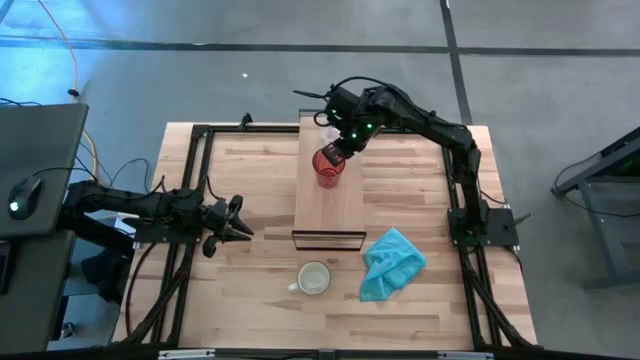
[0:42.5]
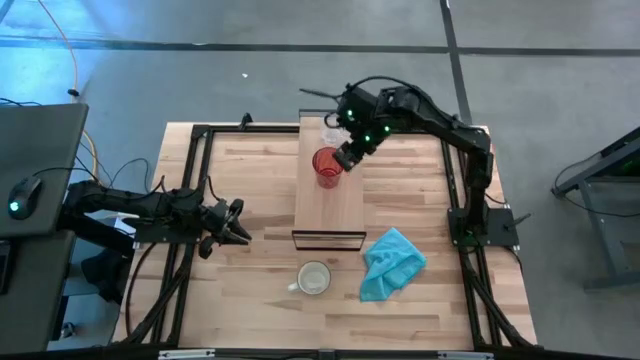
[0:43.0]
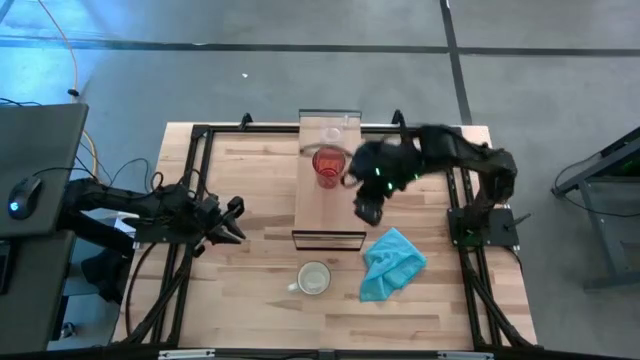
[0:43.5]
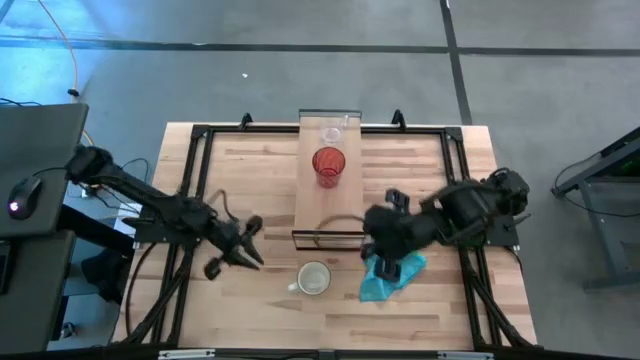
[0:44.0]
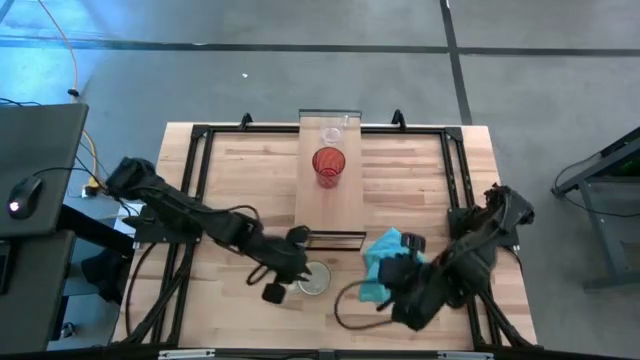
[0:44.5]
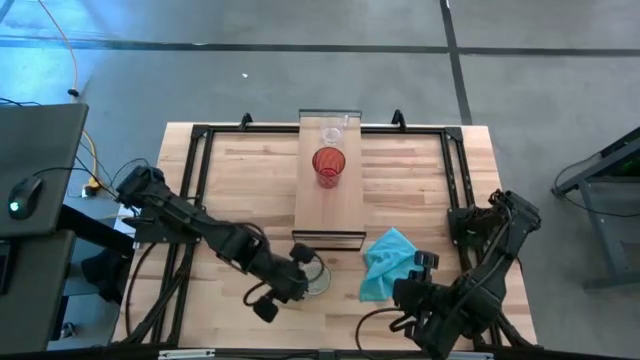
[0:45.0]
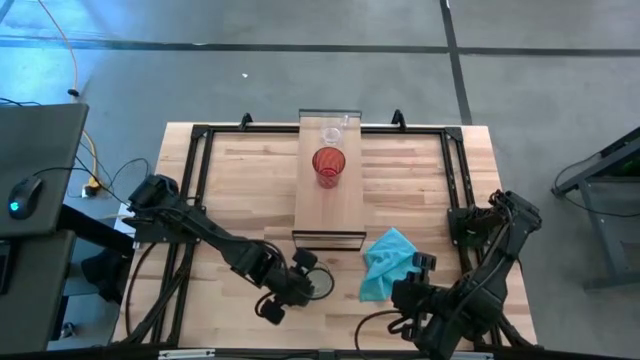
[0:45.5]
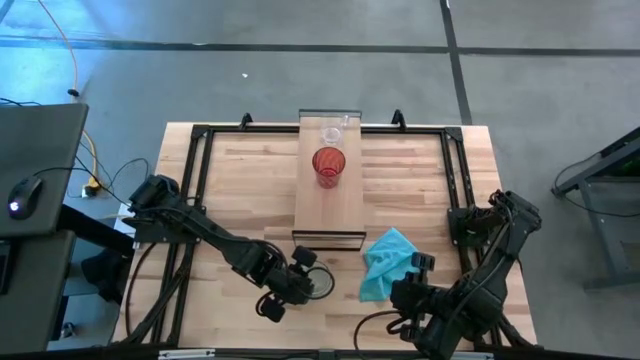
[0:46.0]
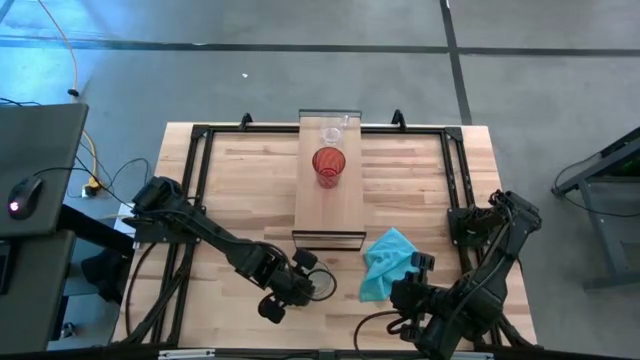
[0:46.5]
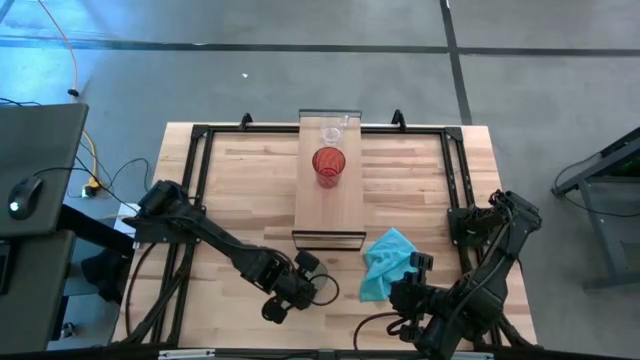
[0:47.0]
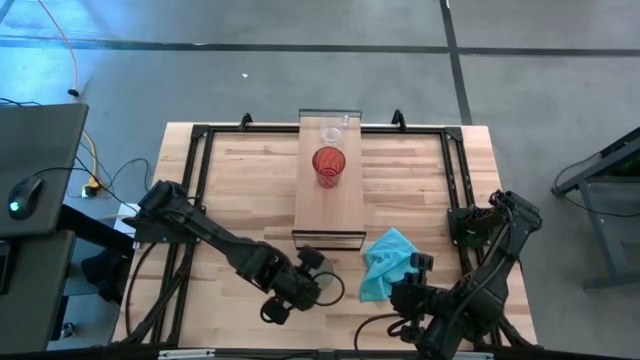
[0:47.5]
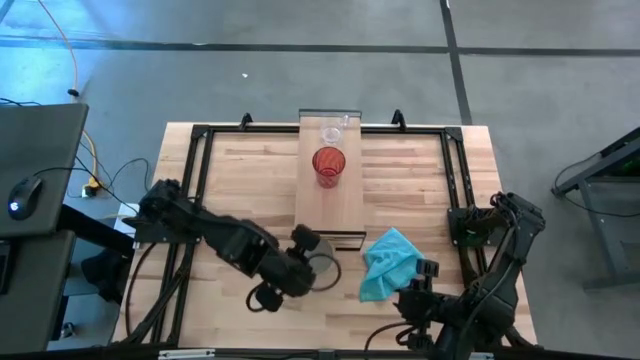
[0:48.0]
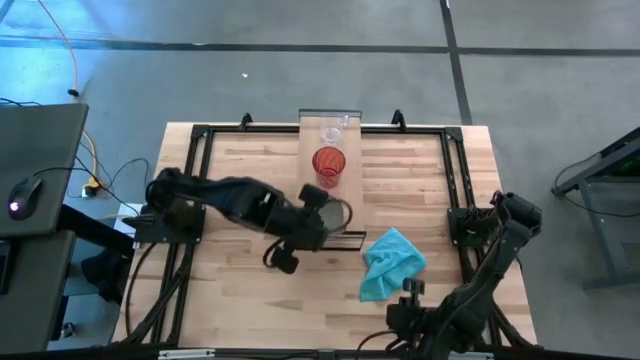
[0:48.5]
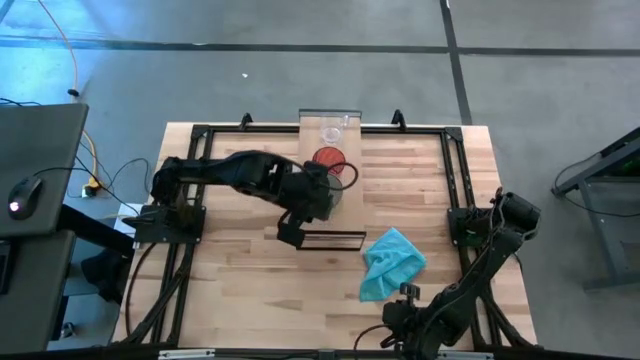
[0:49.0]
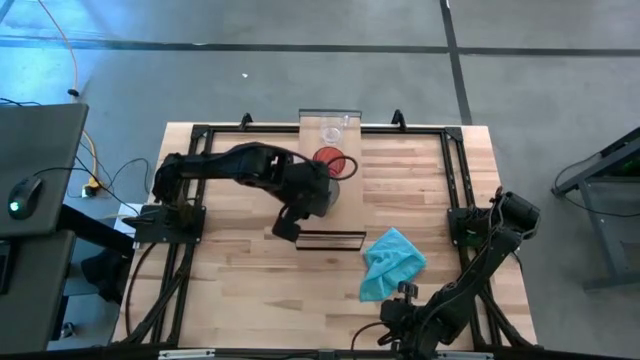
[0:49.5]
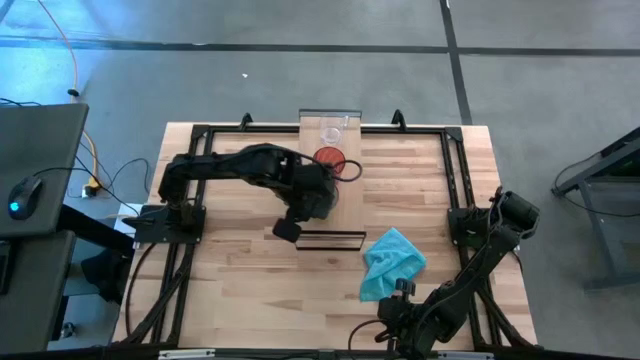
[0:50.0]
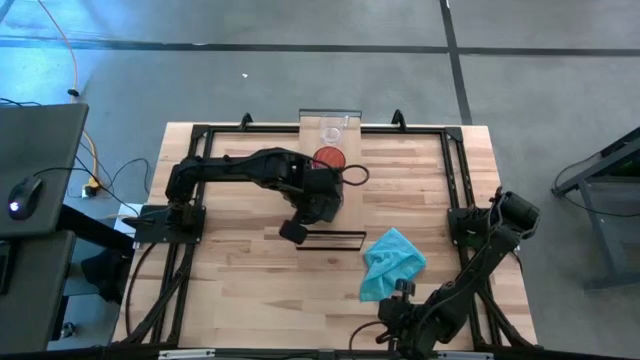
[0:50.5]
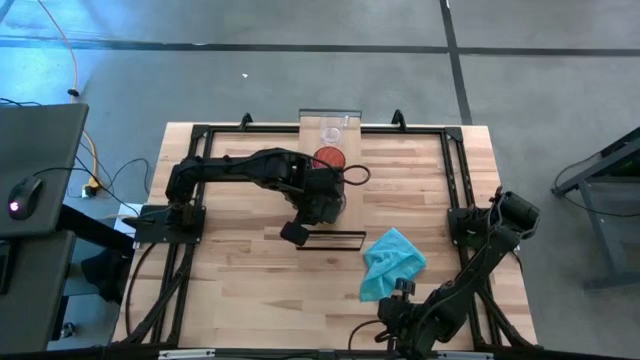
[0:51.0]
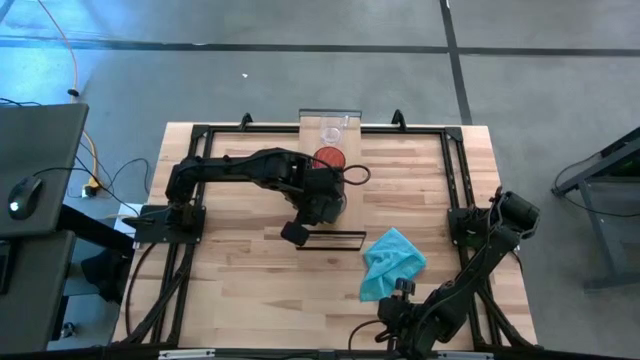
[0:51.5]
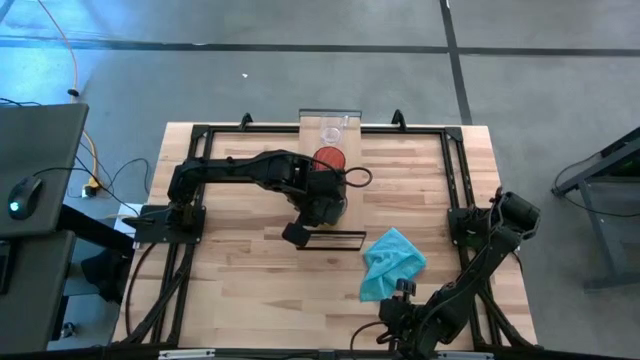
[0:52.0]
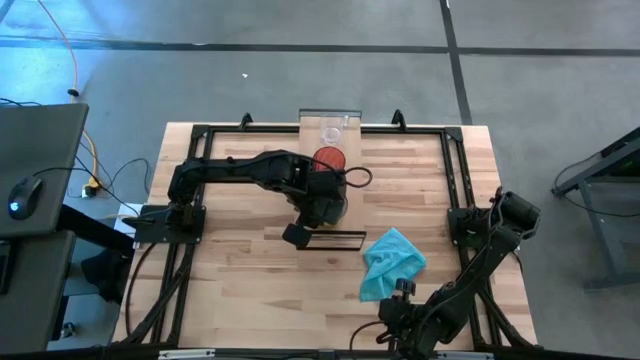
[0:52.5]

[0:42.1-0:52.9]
Task: Stack small to large cups/mugs on shelf
Put the yellow mug on the shelf

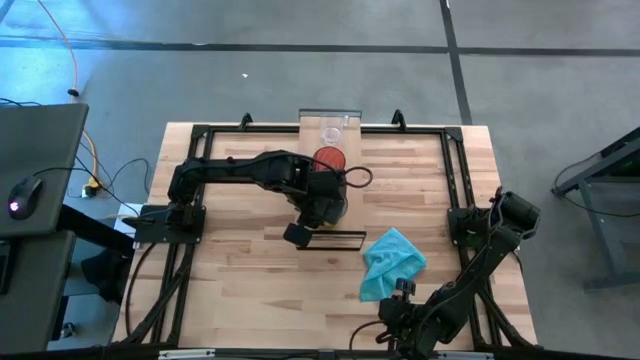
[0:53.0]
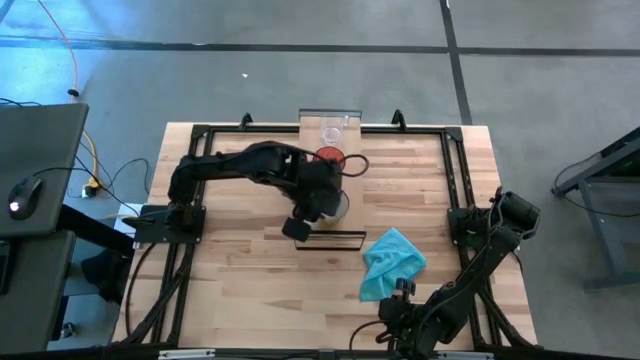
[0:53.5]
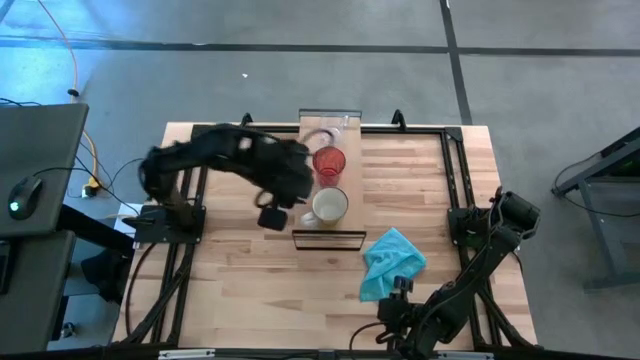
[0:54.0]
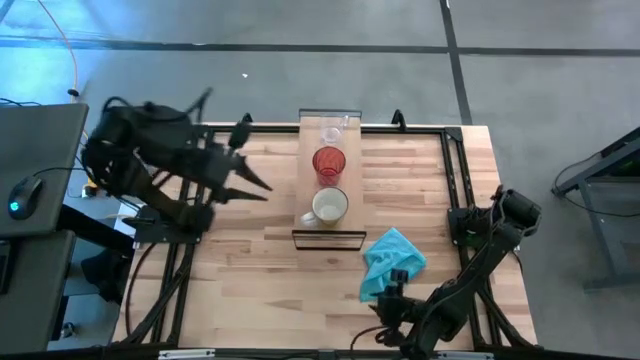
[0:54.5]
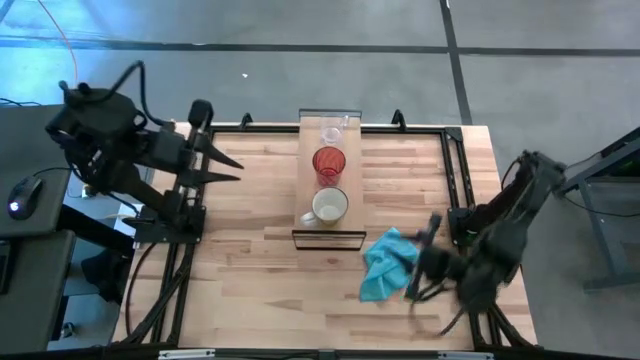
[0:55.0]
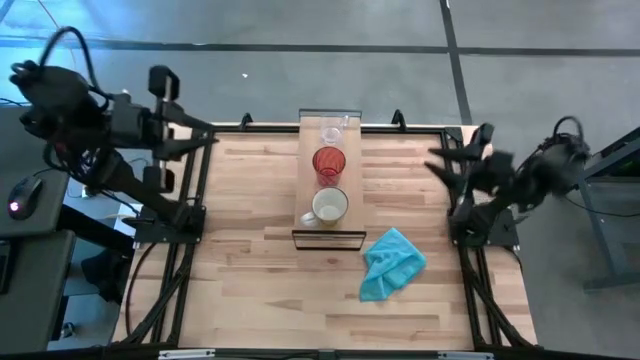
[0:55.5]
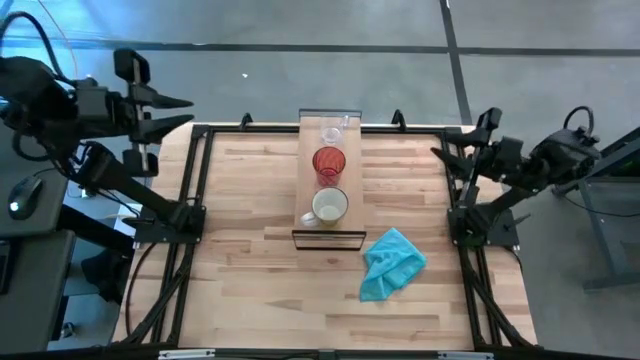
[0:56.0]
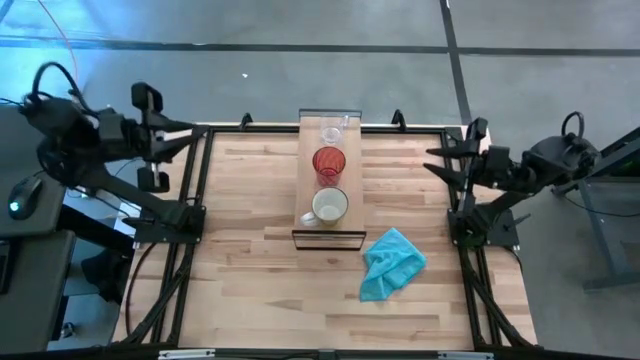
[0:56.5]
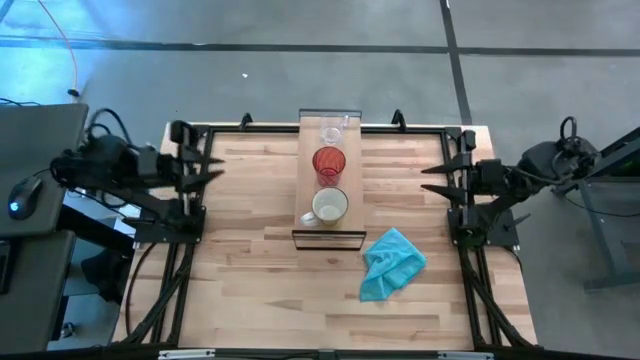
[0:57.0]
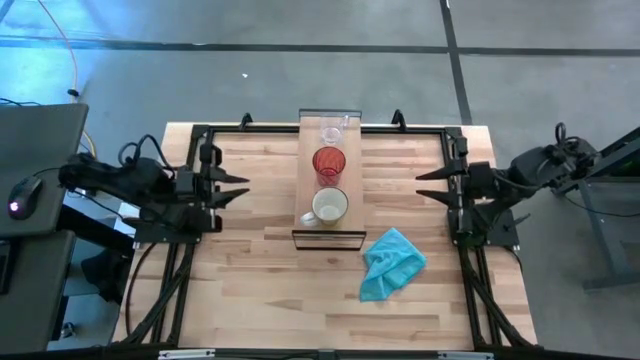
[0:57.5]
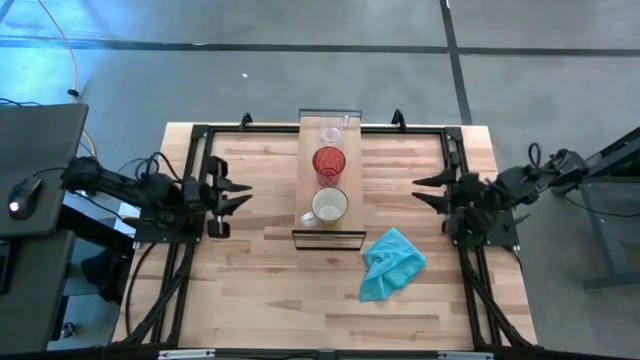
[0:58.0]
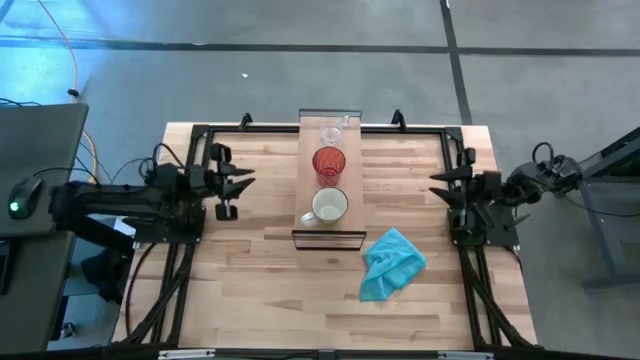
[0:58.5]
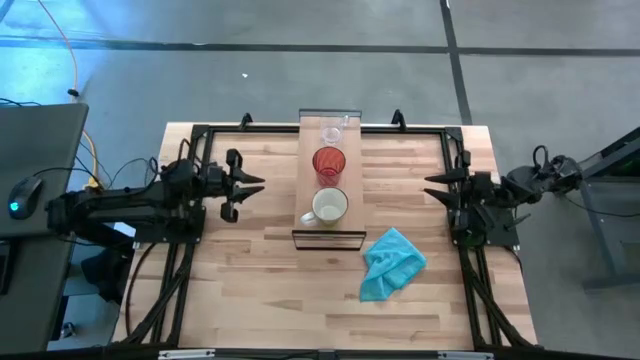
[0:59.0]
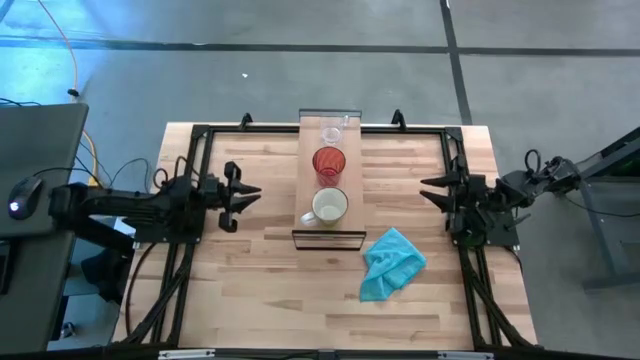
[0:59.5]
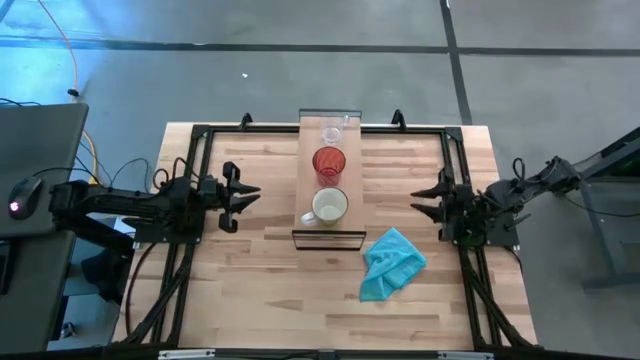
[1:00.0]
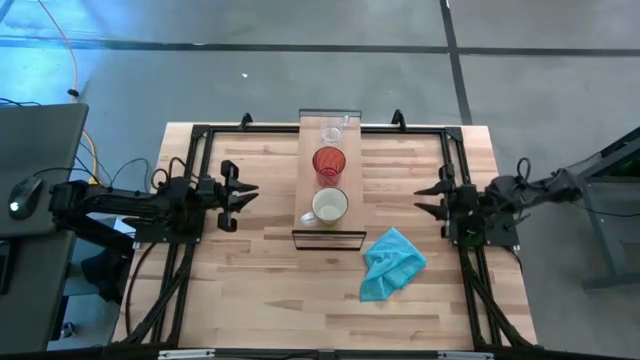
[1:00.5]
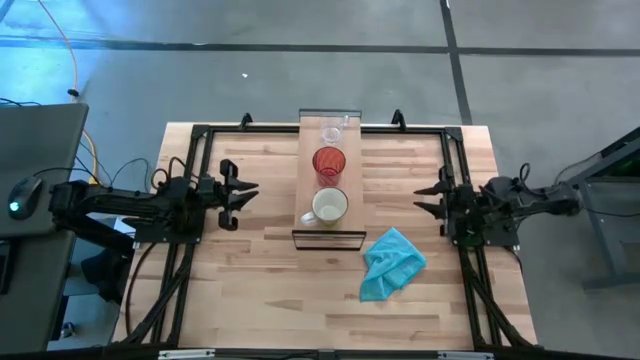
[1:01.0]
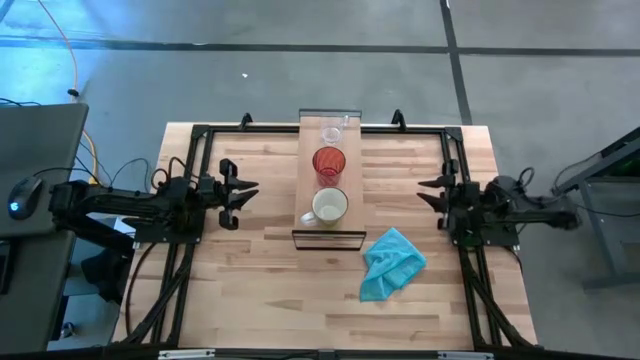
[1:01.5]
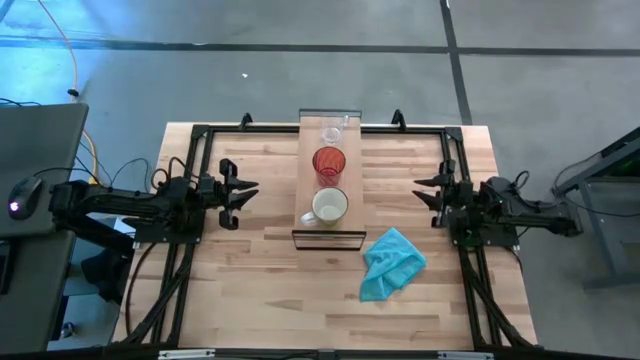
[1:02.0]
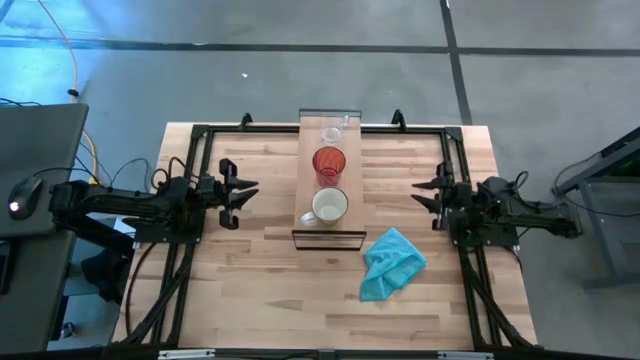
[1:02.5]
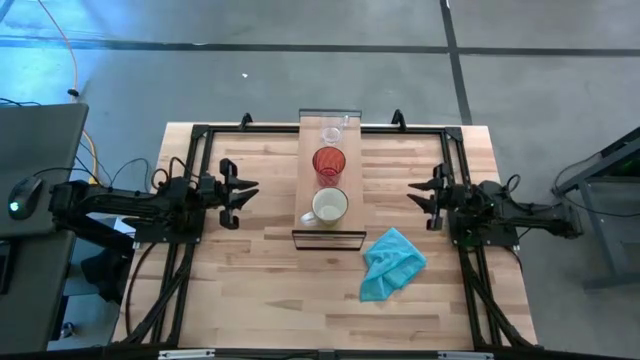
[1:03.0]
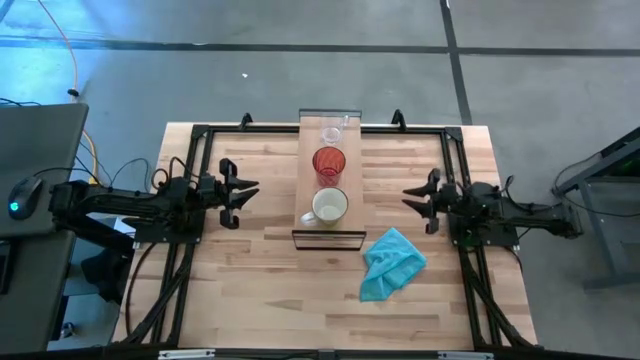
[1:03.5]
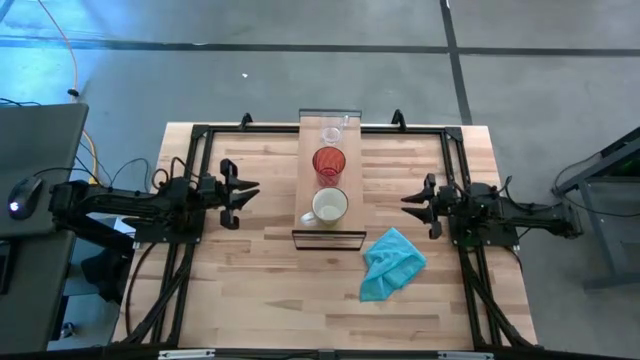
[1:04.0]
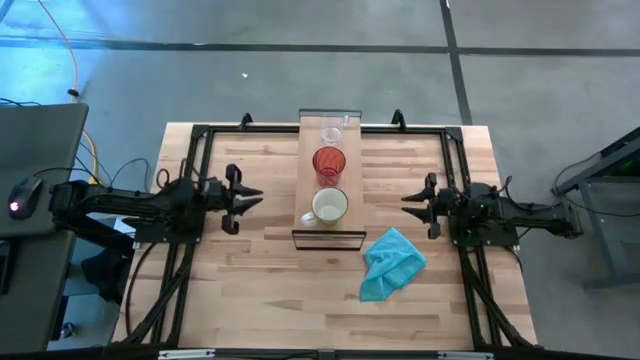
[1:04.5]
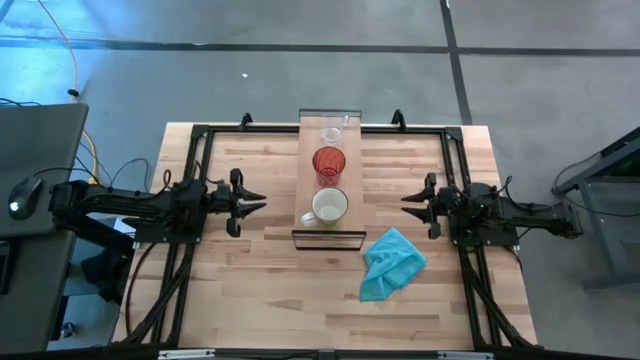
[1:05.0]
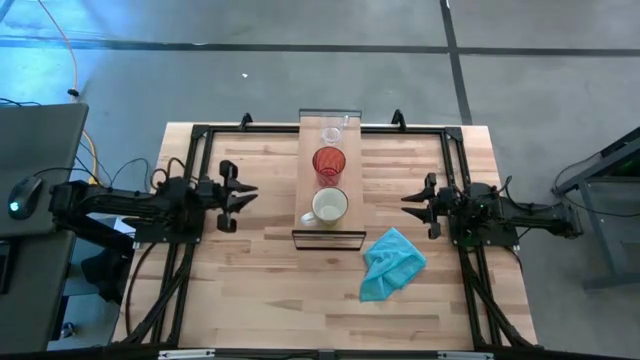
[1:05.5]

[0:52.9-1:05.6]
Return to Home Position
